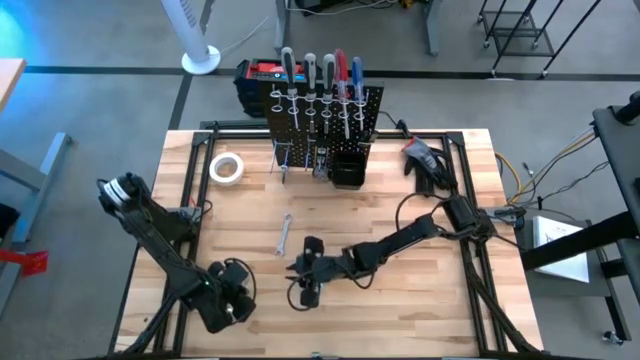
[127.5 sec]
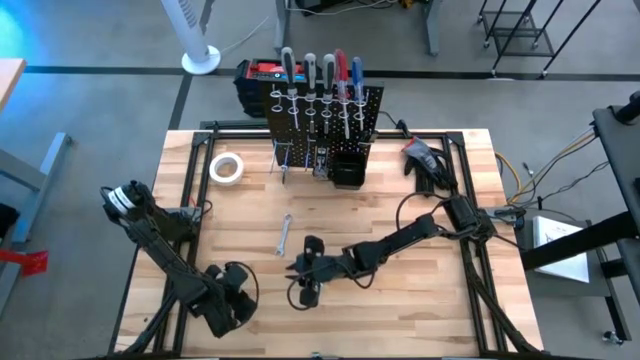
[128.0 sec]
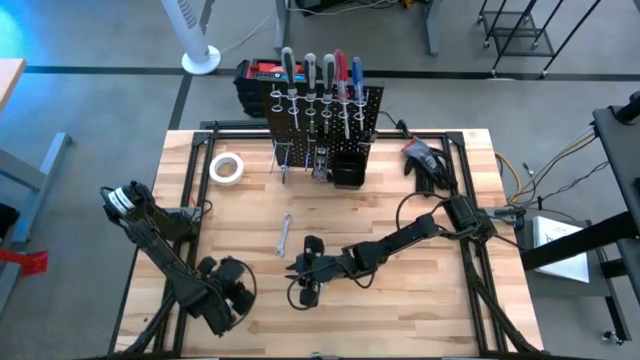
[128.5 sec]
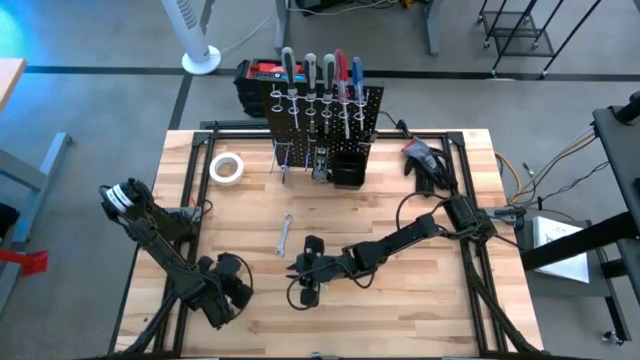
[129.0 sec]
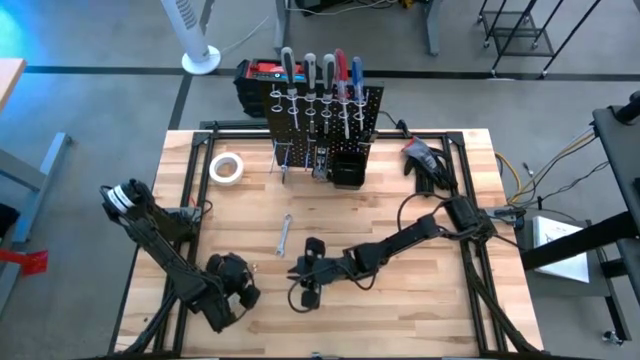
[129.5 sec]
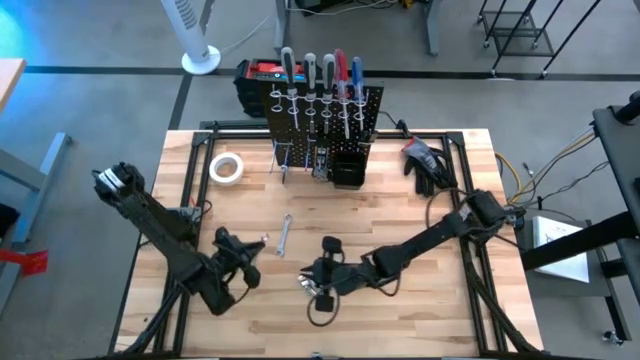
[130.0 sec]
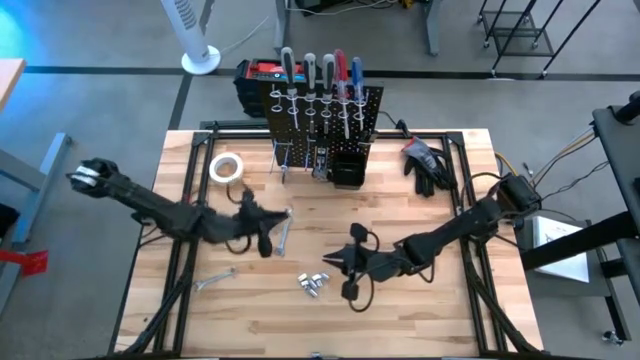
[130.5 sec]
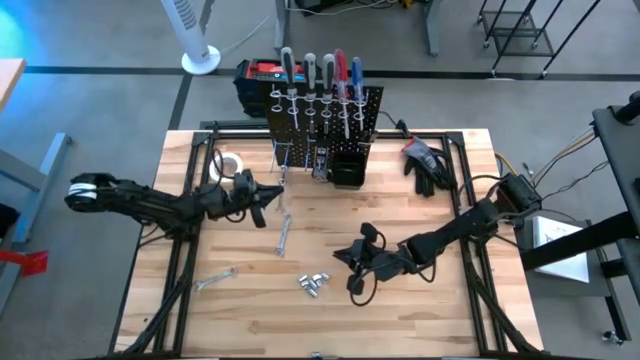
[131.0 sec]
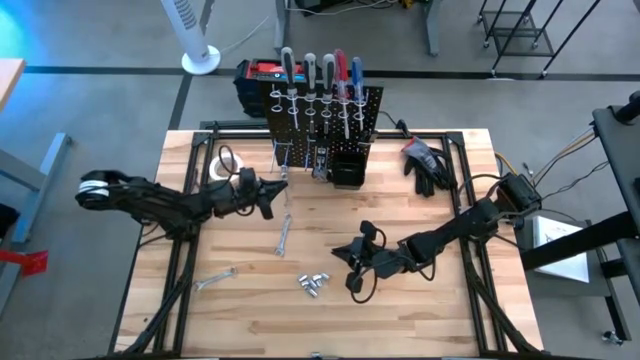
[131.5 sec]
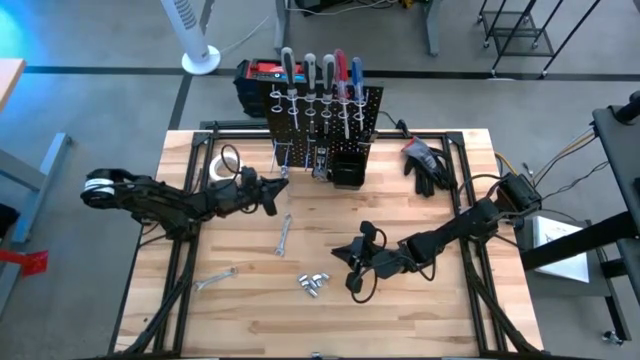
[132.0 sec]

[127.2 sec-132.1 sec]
Task: Hang tools onto peg board
Hang the left wrench on the peg board

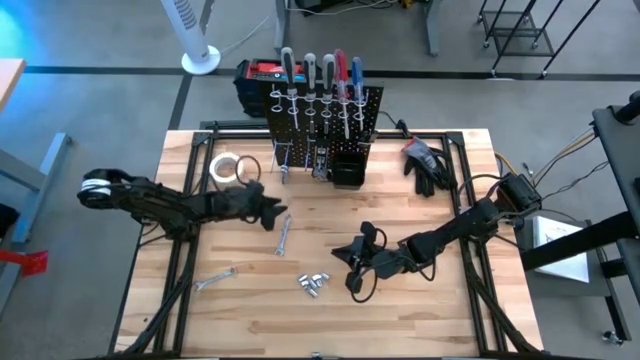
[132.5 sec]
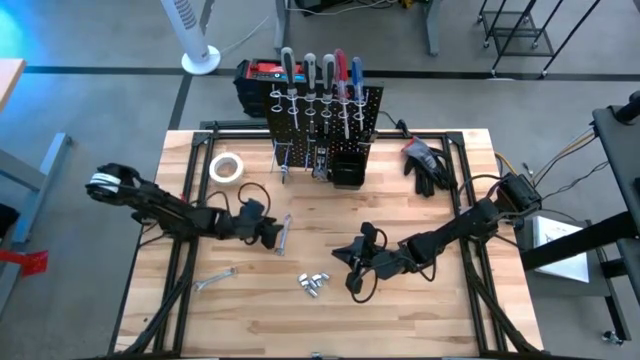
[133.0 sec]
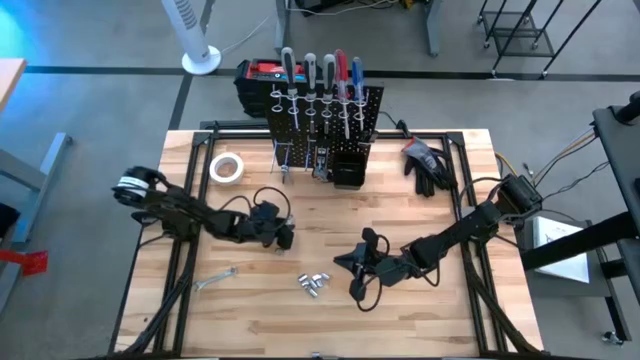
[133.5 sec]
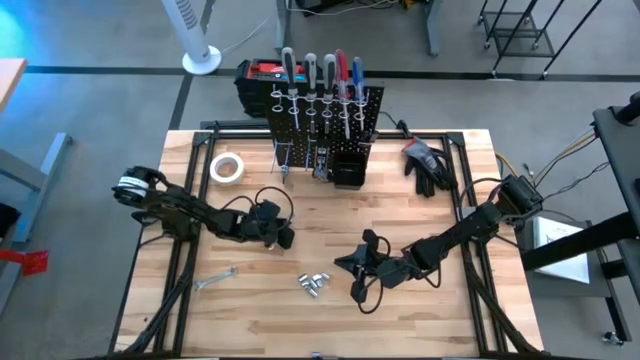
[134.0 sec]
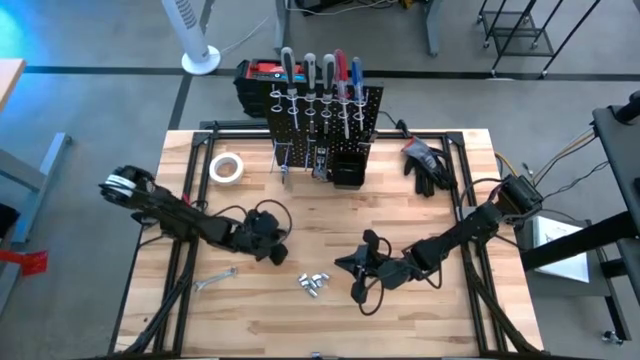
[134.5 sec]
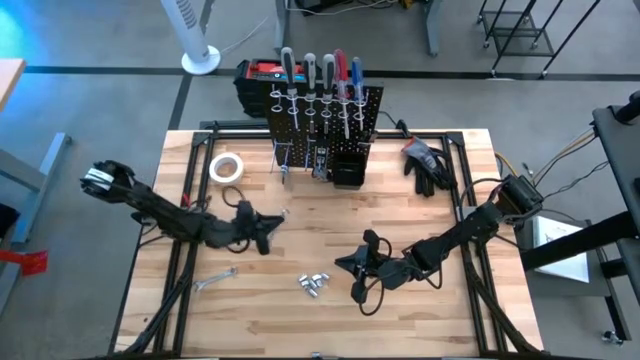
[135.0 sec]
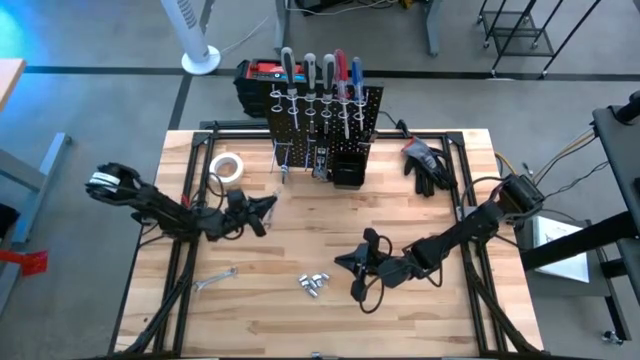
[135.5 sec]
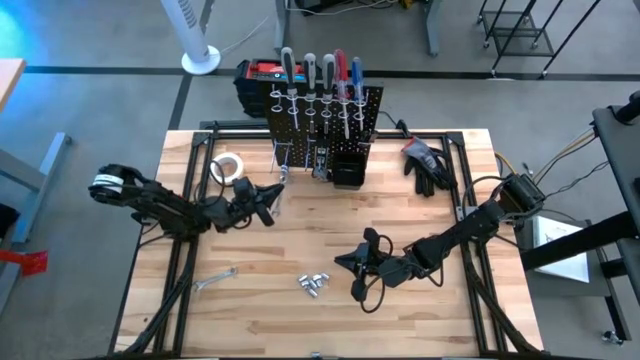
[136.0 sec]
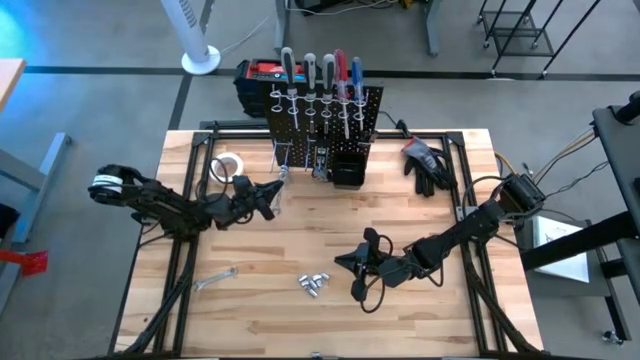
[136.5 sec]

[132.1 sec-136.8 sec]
Hang the top wrench on the peg board

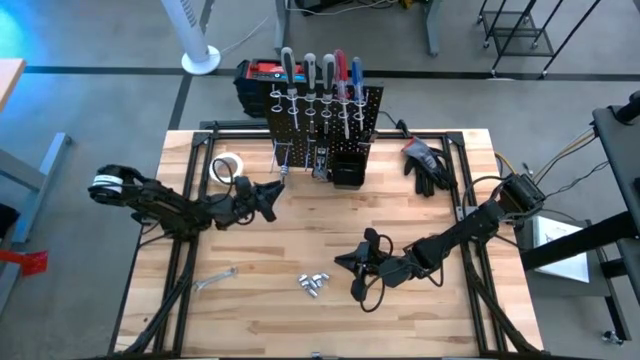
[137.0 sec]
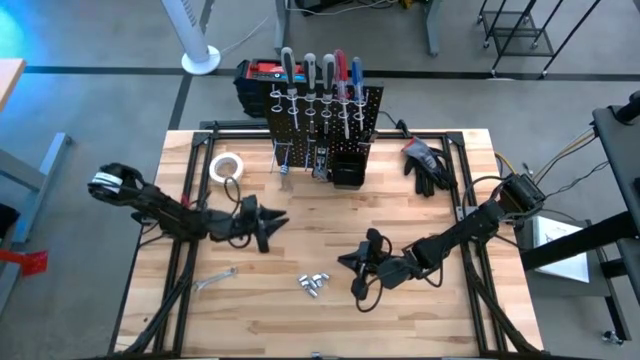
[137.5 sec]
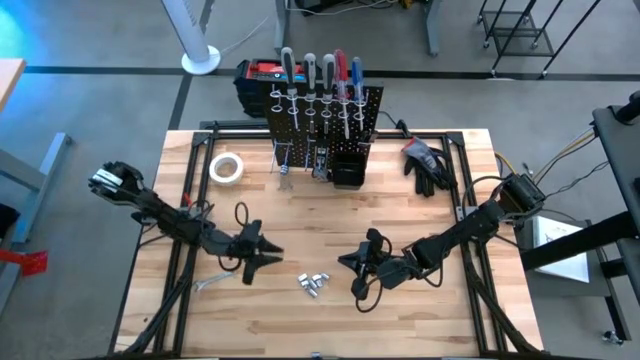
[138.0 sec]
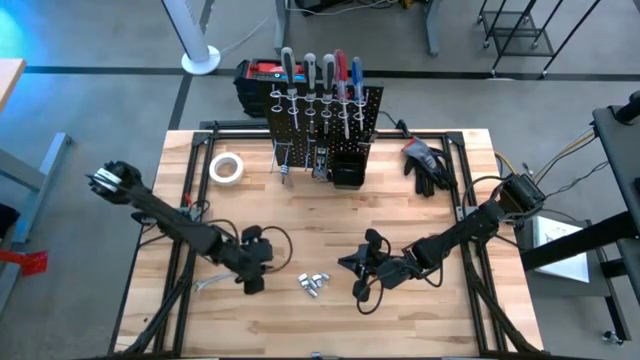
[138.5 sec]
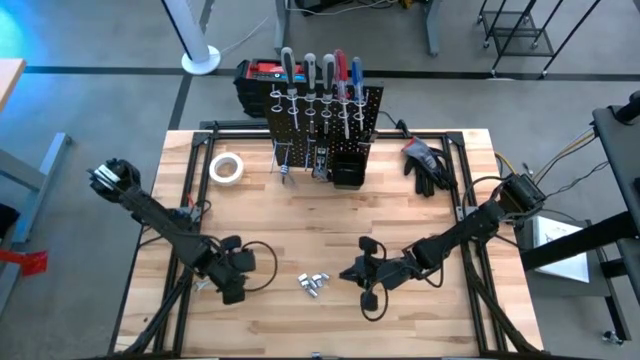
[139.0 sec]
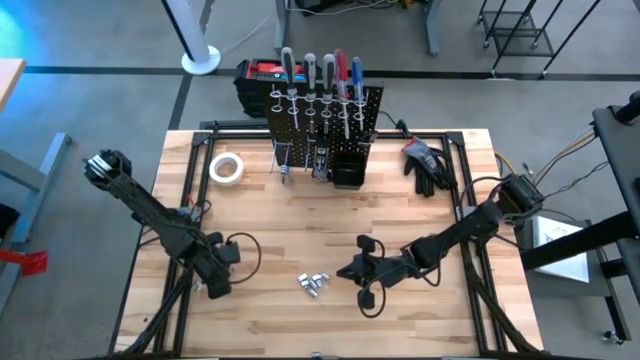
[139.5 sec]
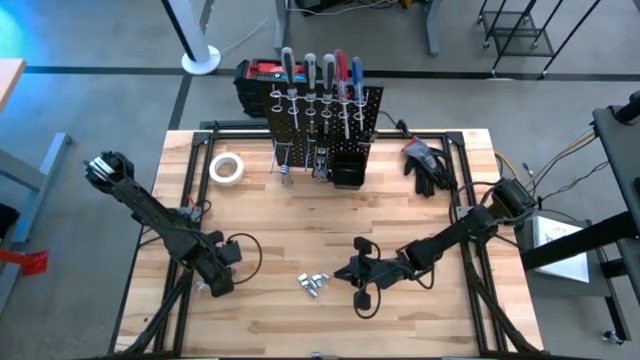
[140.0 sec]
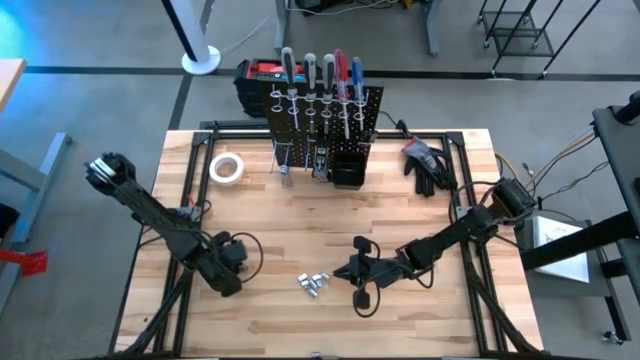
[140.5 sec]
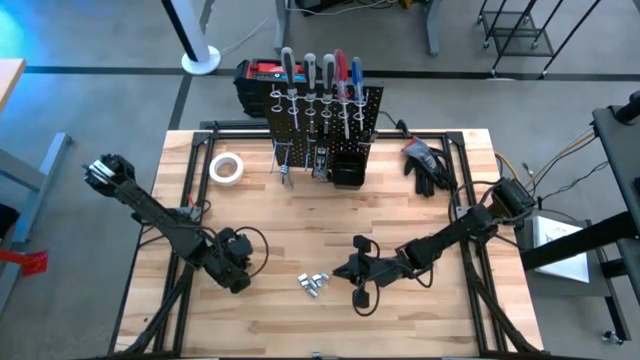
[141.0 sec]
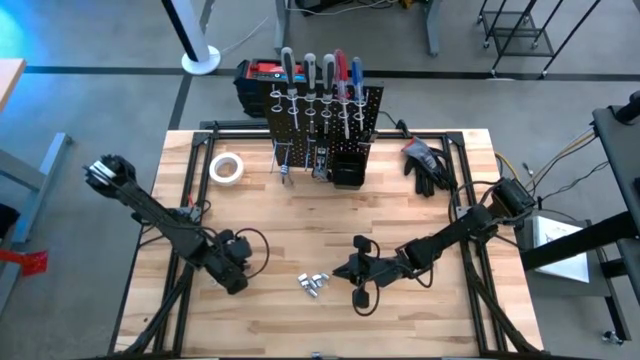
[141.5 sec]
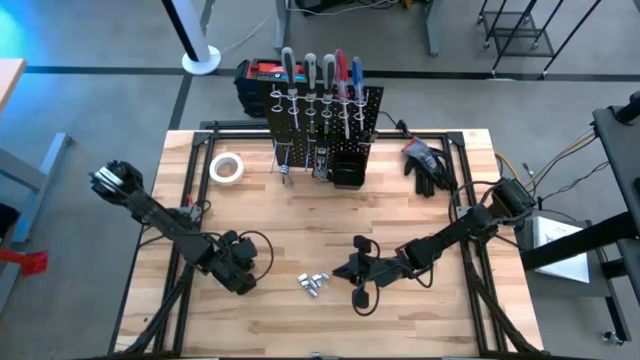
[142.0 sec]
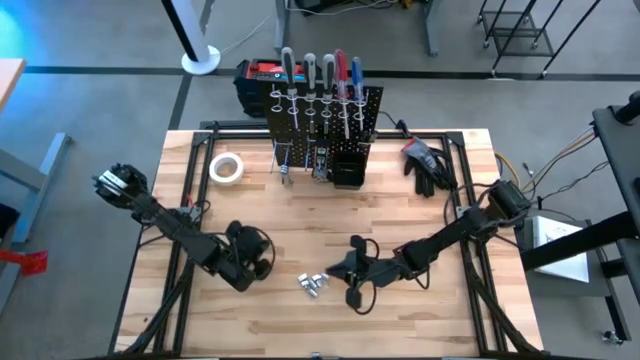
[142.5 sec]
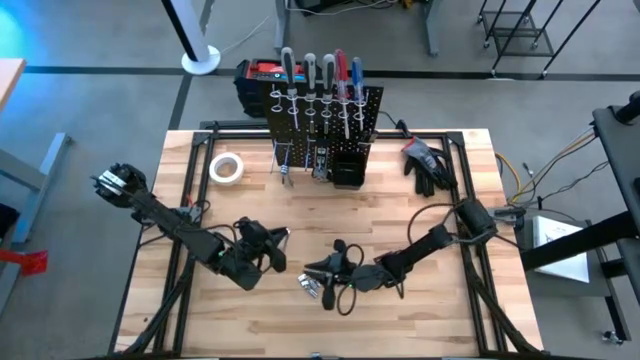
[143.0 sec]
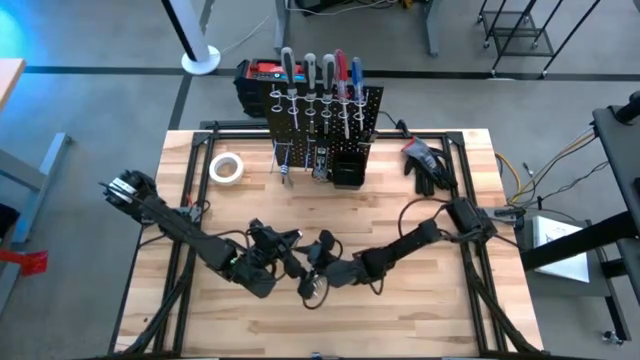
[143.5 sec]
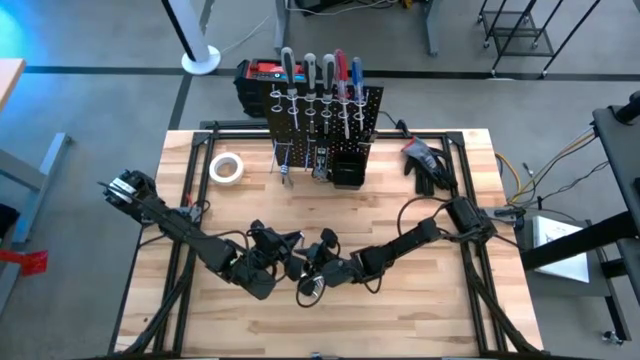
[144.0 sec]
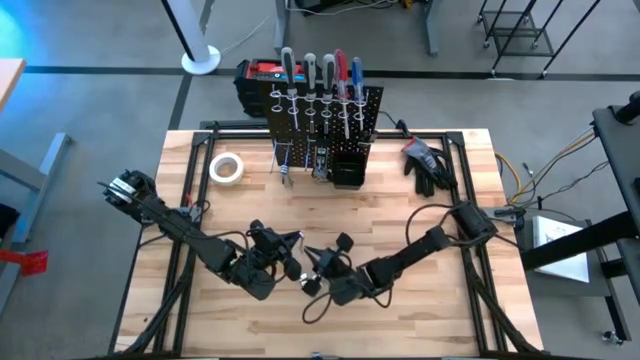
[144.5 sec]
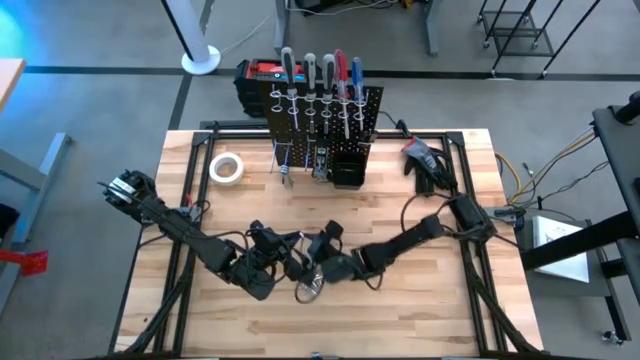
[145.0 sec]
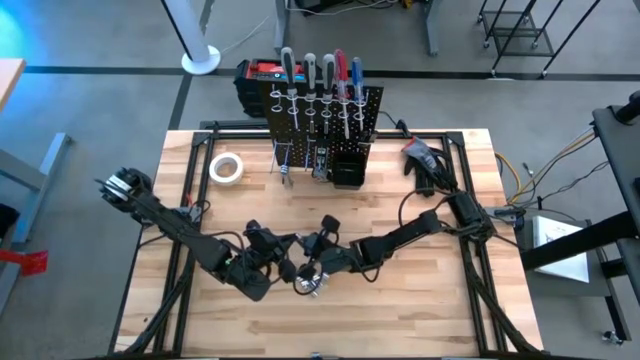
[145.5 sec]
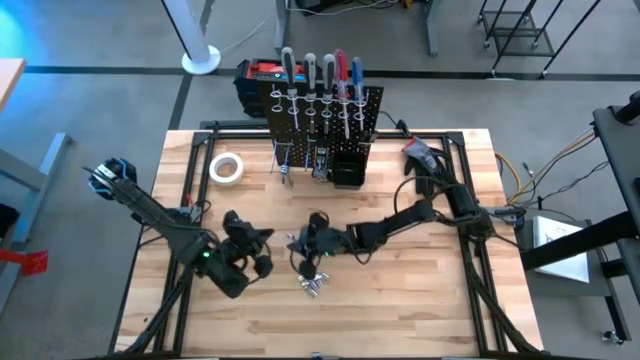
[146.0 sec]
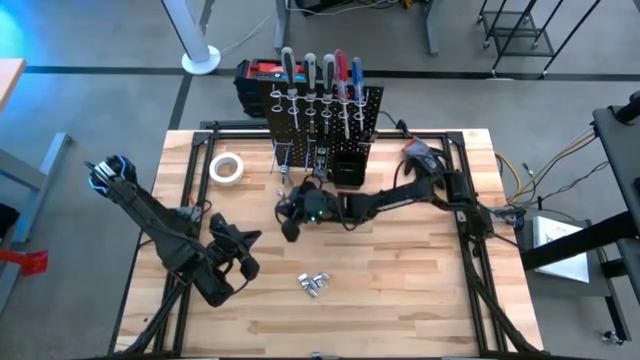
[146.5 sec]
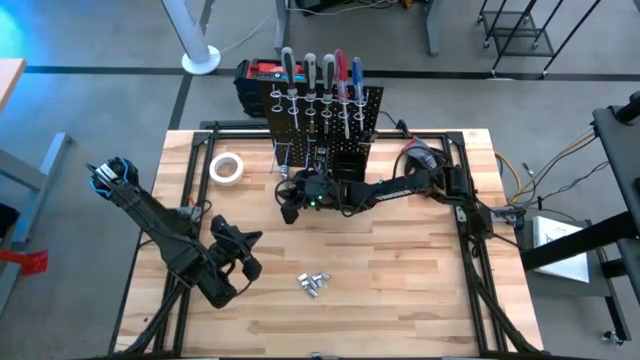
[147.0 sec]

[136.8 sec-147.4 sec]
Hang the wrench on the peg board
